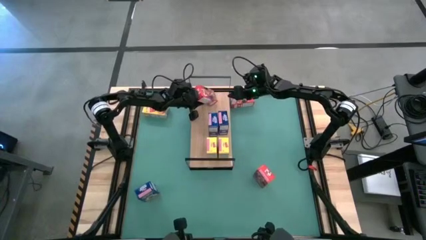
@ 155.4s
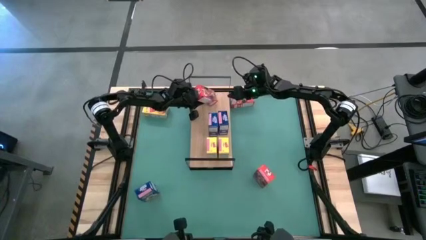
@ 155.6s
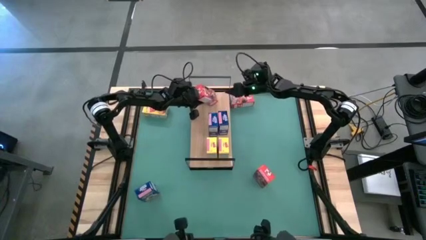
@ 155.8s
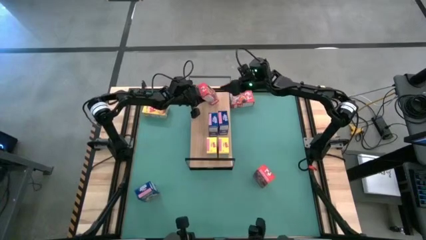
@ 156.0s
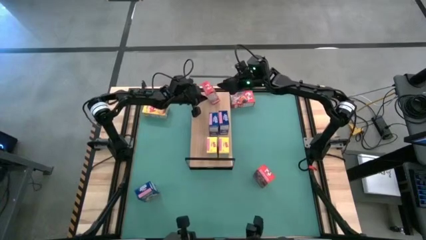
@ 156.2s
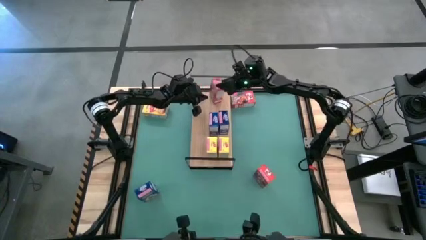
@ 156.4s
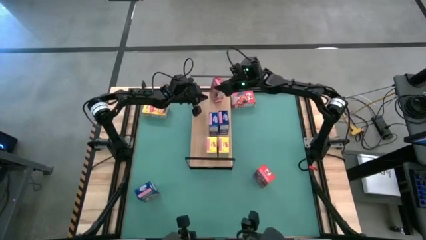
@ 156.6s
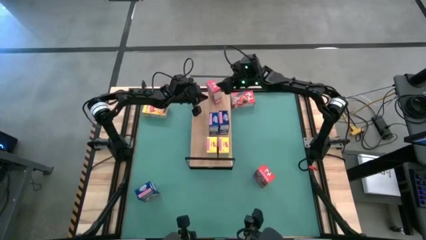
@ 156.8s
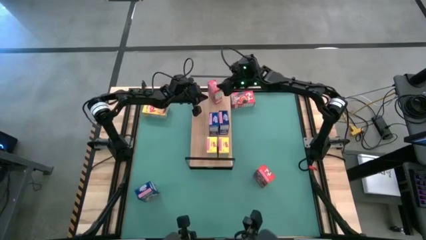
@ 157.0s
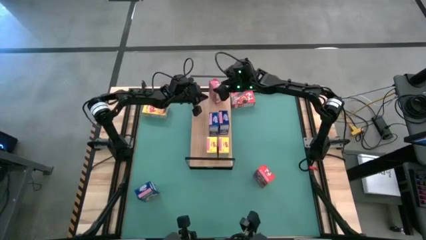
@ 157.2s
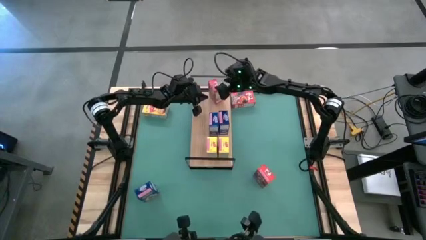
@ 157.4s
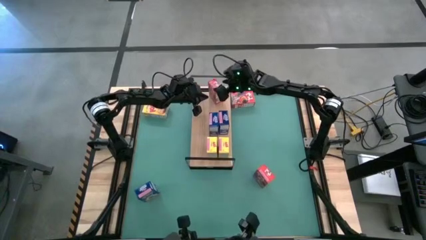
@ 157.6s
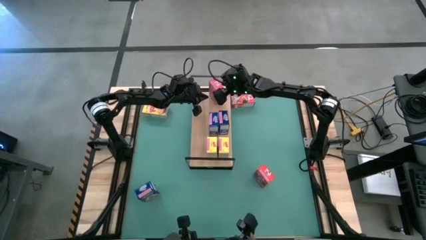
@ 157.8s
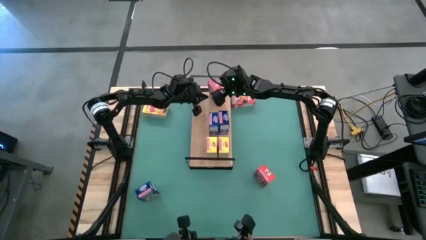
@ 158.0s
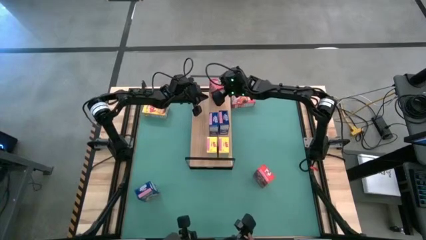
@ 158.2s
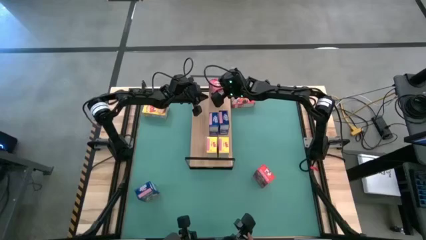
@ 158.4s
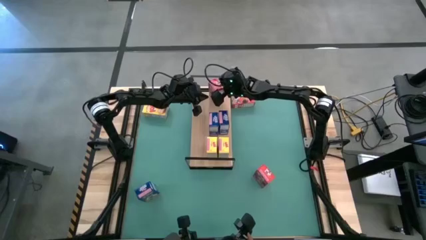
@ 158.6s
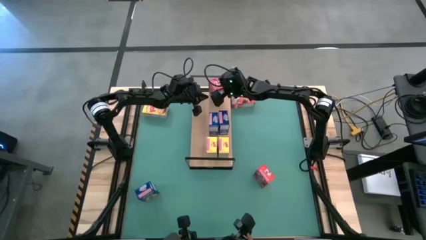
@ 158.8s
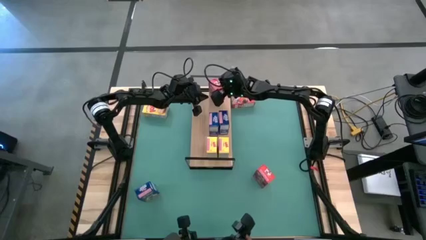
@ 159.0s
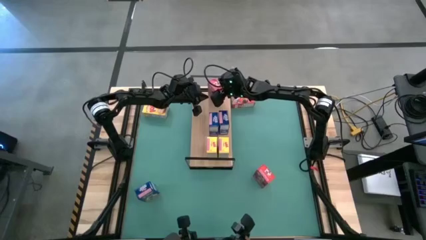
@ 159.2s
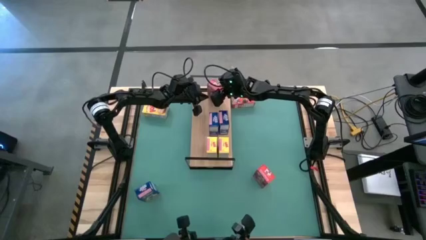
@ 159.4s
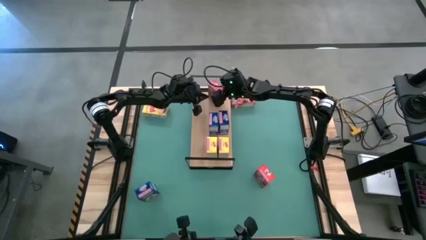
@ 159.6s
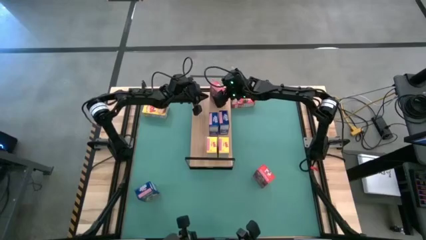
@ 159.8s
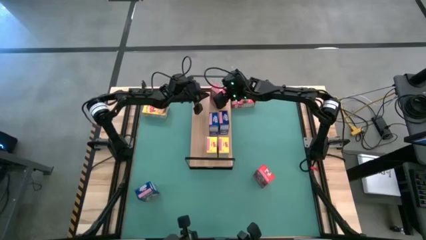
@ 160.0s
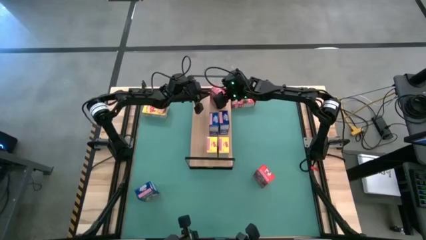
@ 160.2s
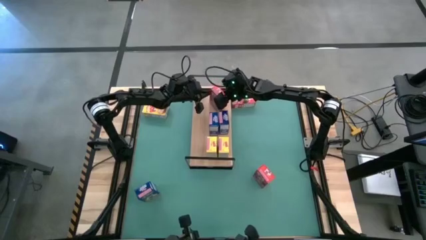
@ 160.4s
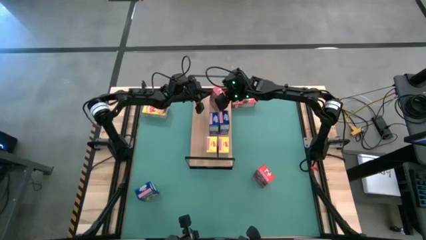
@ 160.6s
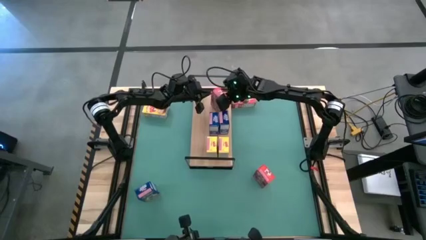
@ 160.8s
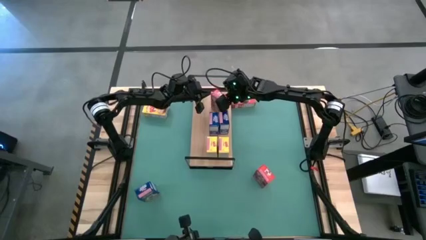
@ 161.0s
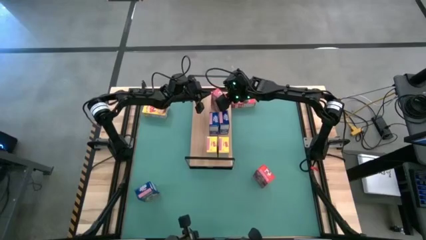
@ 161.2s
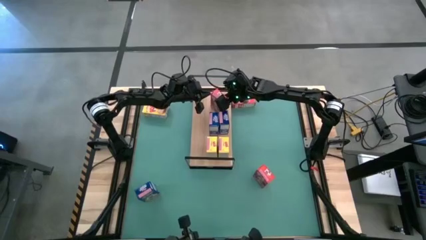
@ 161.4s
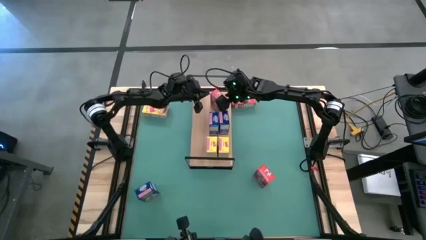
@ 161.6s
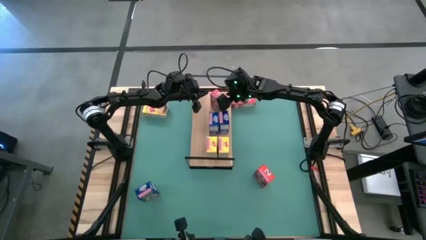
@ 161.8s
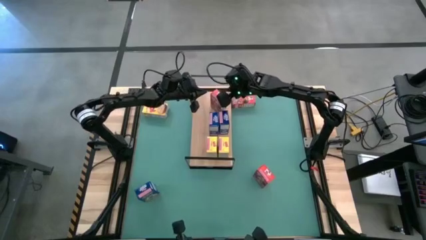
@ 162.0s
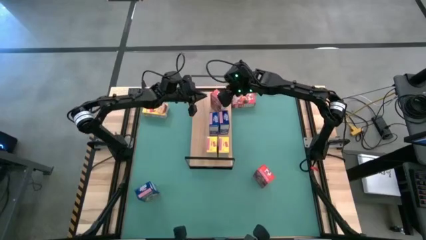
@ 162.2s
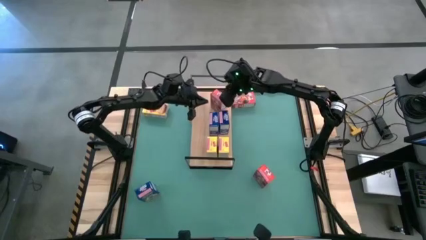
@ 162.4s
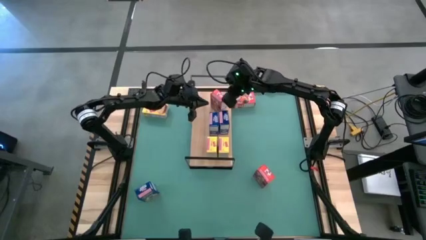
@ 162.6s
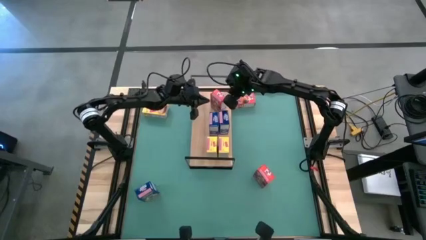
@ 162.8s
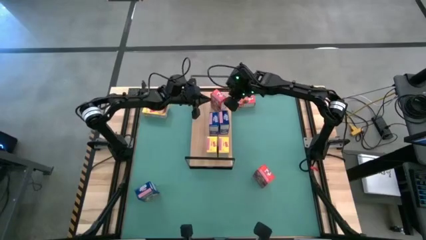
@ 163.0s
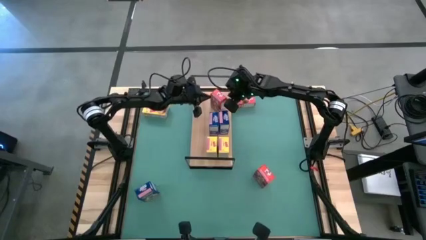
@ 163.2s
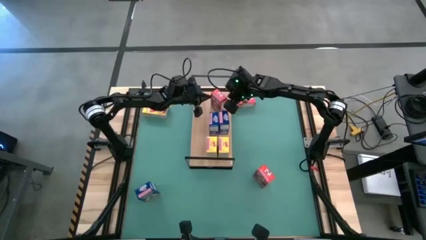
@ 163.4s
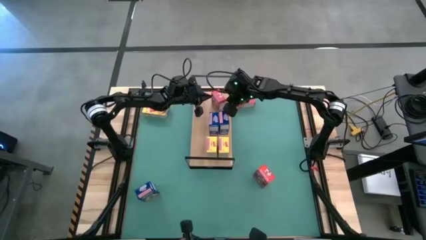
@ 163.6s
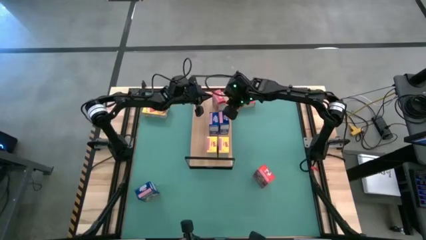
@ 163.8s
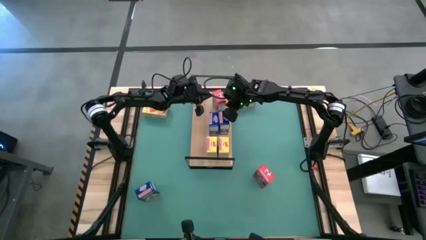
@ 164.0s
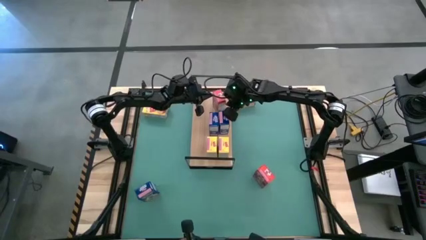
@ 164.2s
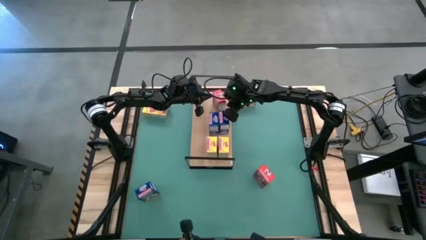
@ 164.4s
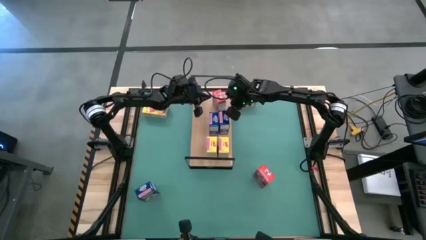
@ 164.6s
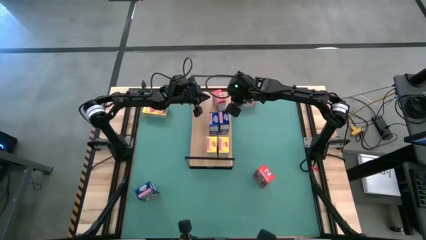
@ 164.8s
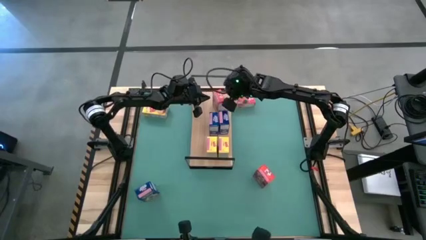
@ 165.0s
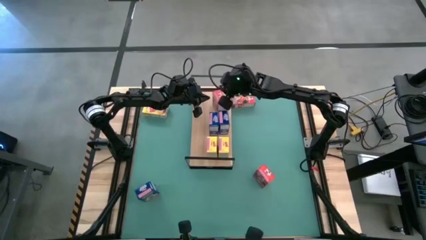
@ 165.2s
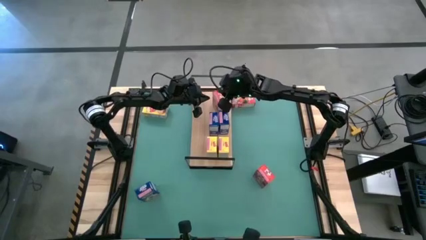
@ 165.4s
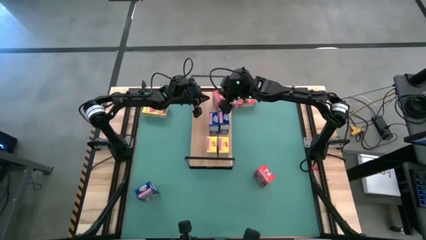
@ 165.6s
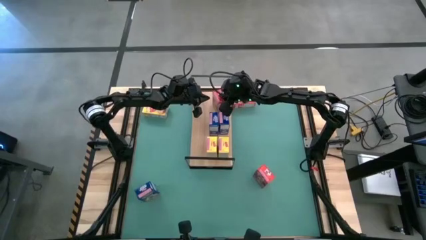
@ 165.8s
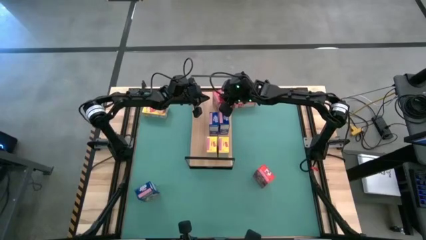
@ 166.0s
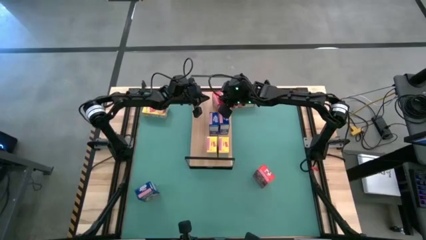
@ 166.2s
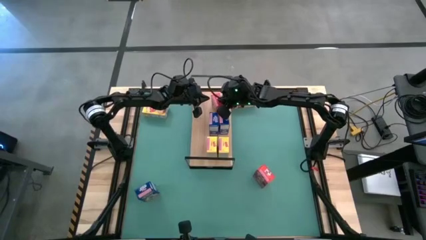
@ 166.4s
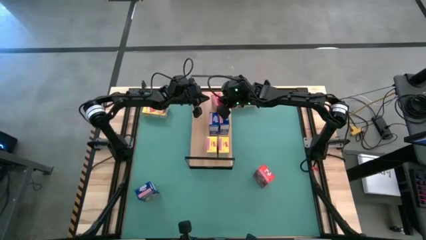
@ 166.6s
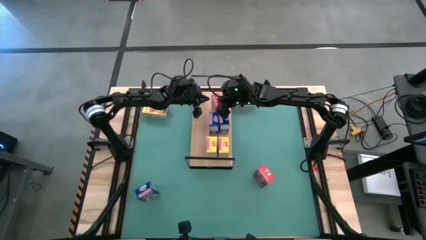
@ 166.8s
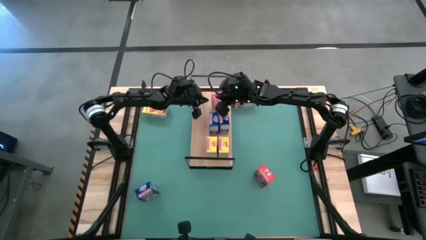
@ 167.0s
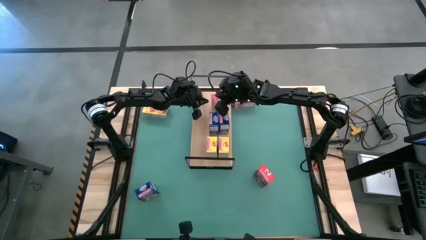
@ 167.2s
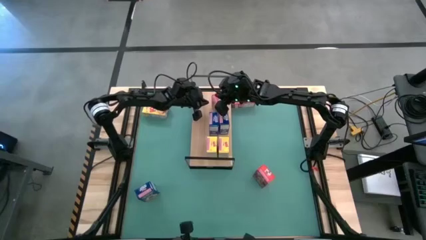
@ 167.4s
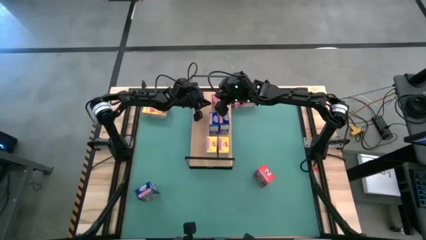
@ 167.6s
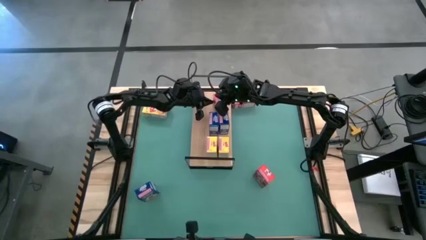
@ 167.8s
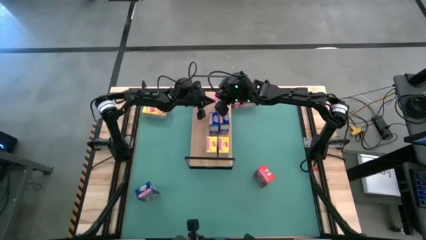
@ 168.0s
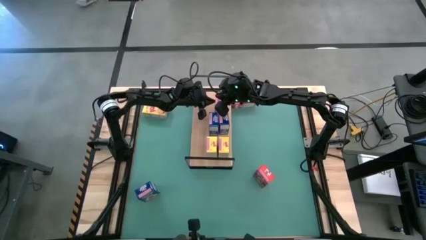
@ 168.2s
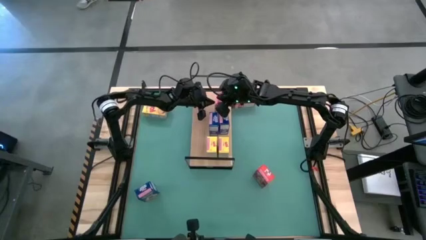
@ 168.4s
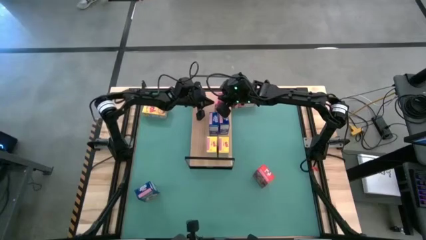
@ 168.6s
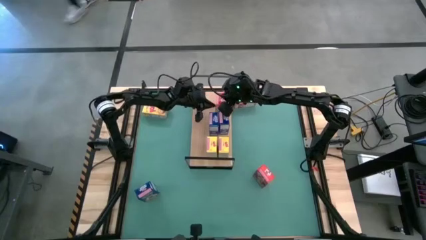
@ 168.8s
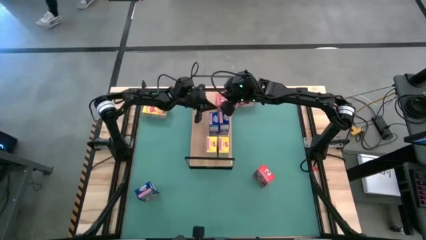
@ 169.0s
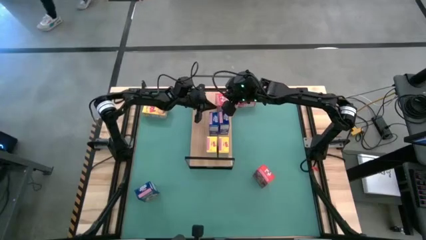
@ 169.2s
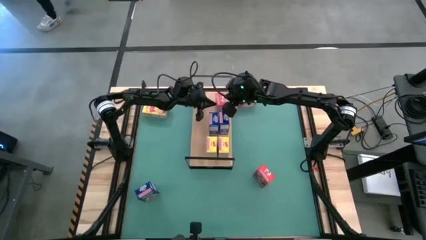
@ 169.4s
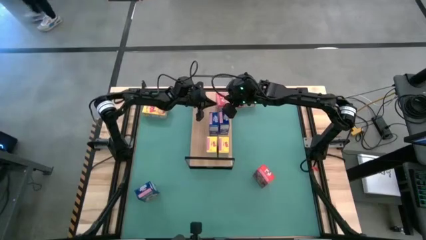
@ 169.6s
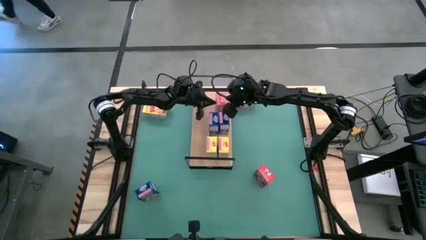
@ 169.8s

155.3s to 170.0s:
Task: Stack cereal on shelf
Put the top red cereal box on the shelf

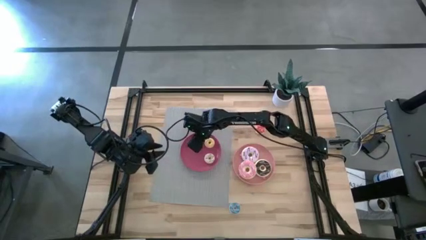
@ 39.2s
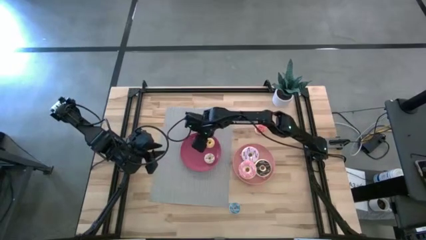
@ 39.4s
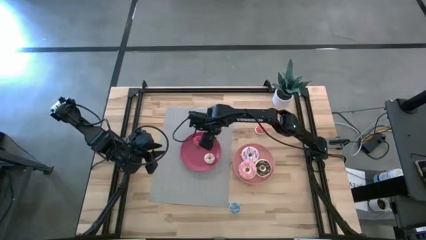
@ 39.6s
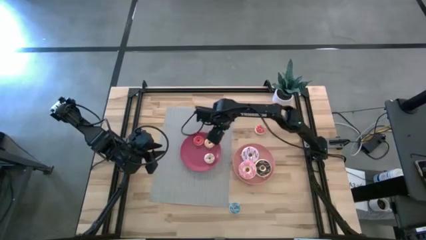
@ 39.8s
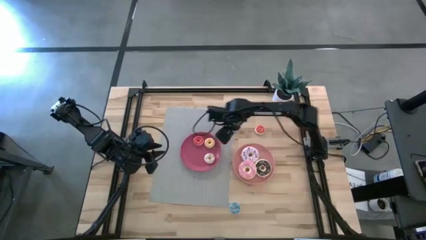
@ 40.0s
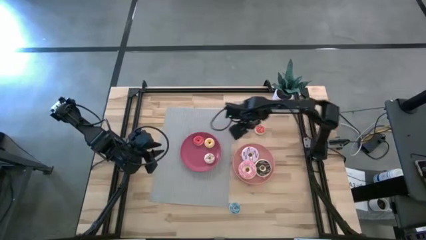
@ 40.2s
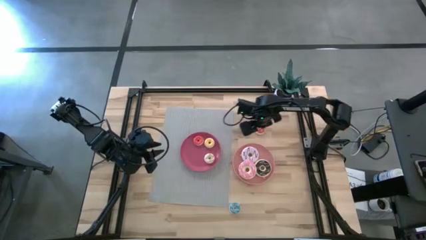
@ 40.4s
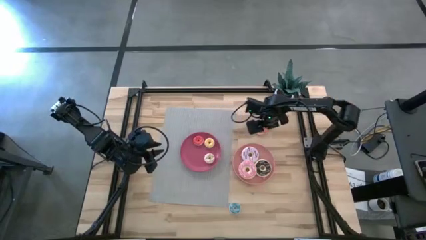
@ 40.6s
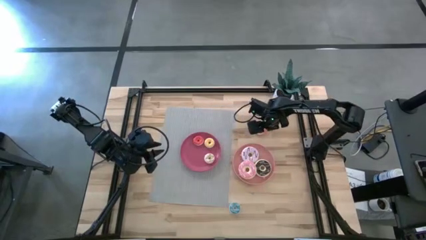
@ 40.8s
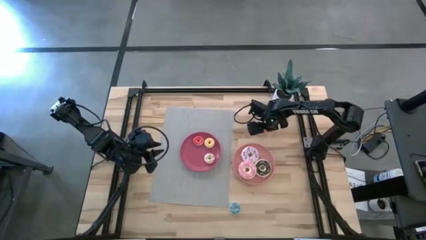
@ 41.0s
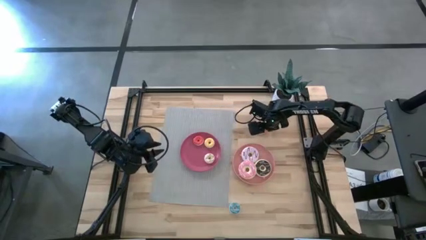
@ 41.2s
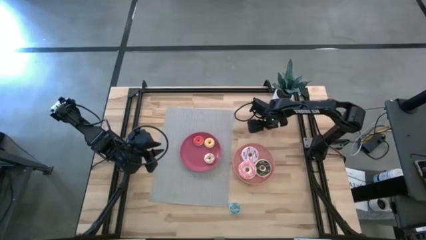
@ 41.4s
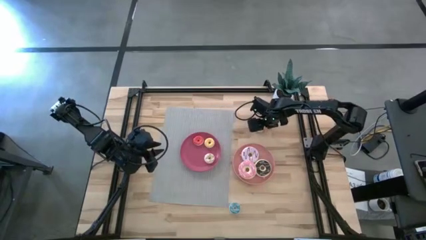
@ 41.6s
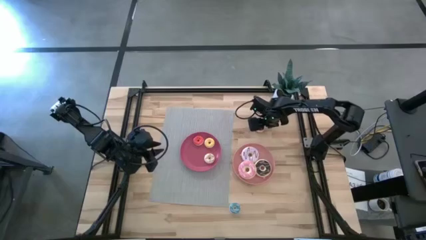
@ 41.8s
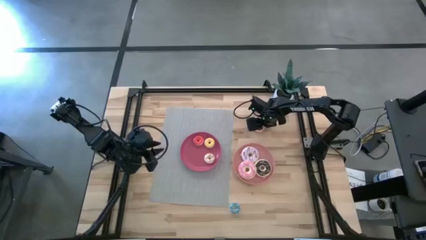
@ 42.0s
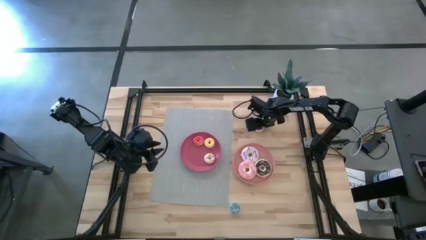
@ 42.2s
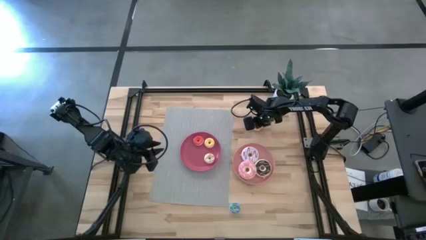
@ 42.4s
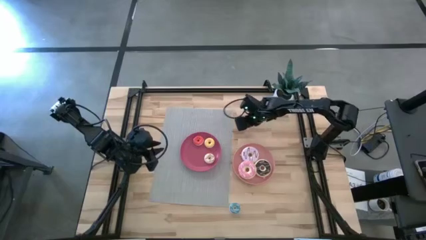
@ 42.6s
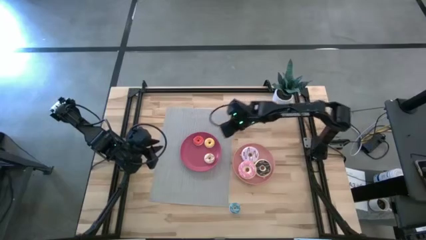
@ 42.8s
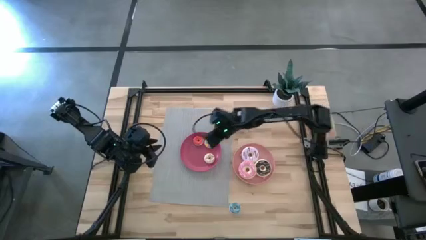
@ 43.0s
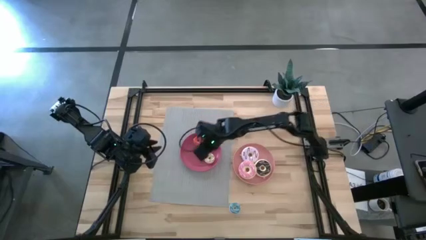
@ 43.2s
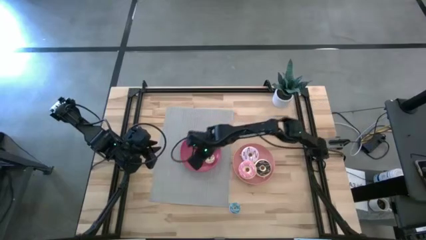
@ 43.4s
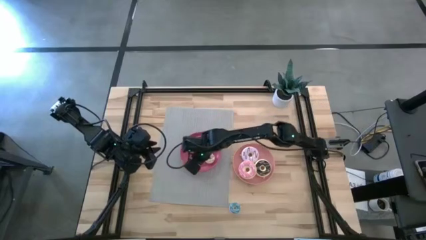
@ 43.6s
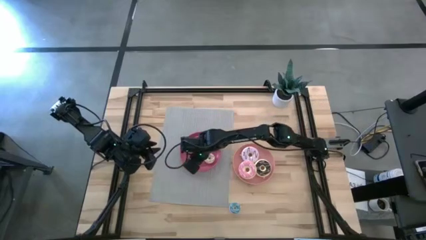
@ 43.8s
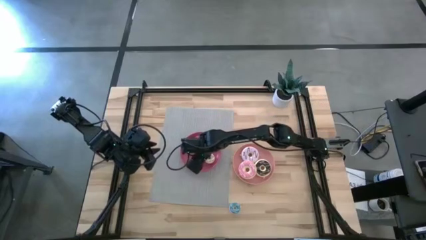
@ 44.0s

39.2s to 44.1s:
Task: Pick & Place donuts
Put the small orange donut into the pink plate
